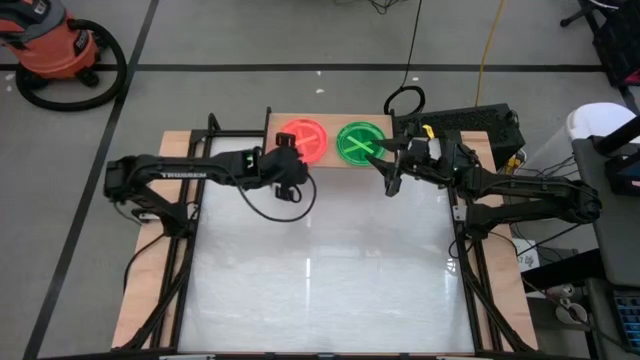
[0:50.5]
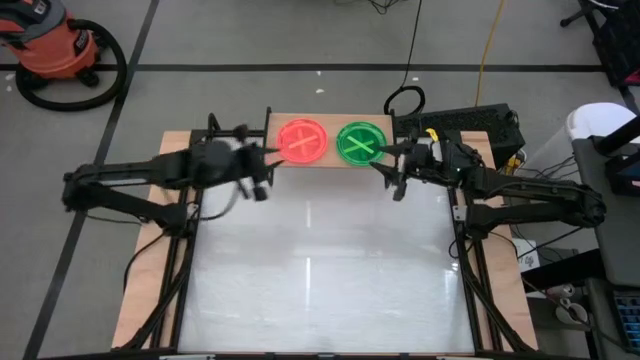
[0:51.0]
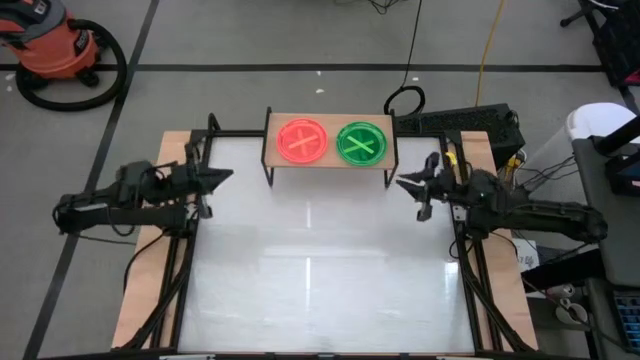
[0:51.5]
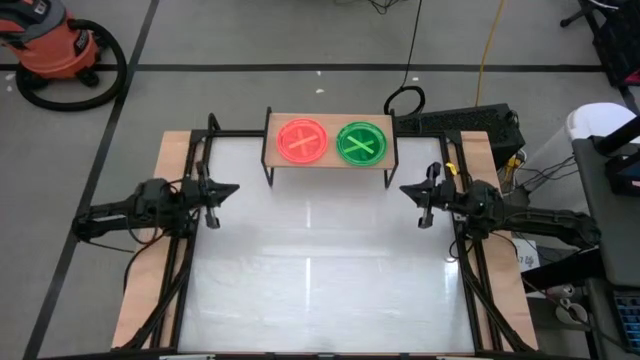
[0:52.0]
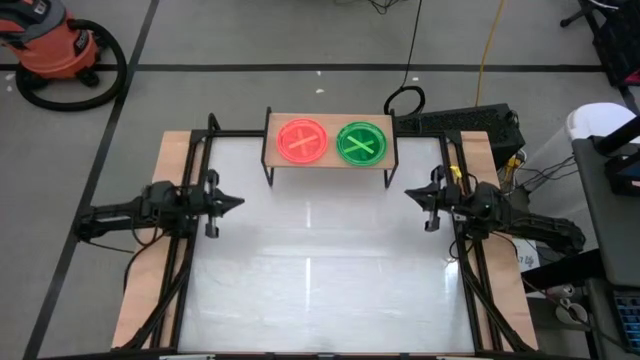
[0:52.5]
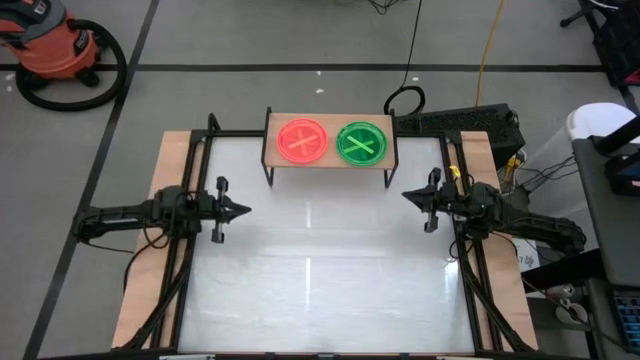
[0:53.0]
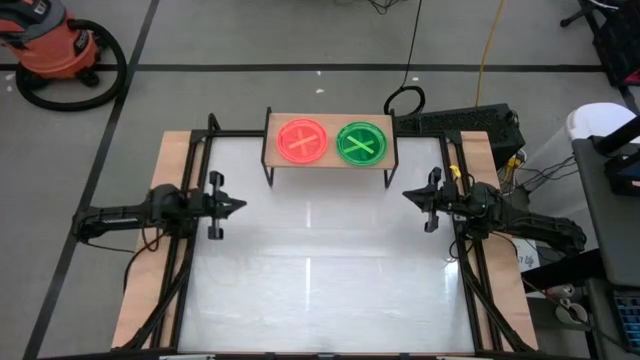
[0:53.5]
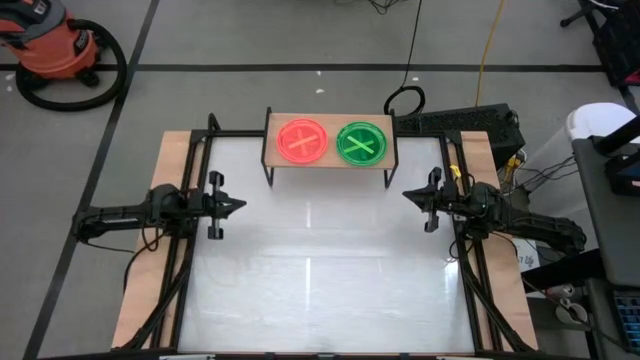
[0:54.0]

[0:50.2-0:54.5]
Task: Place and stack plates onto a shelf
Return to Home Position

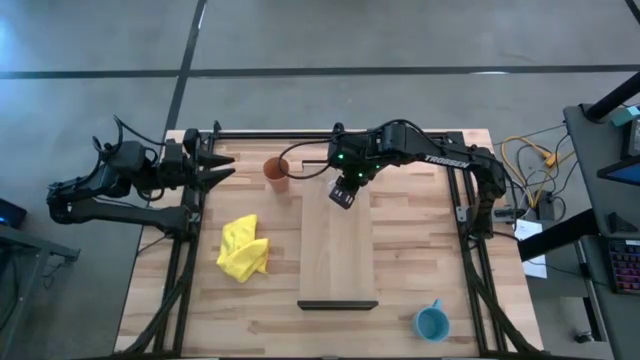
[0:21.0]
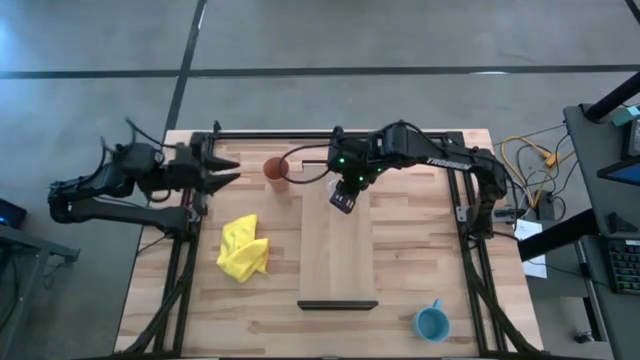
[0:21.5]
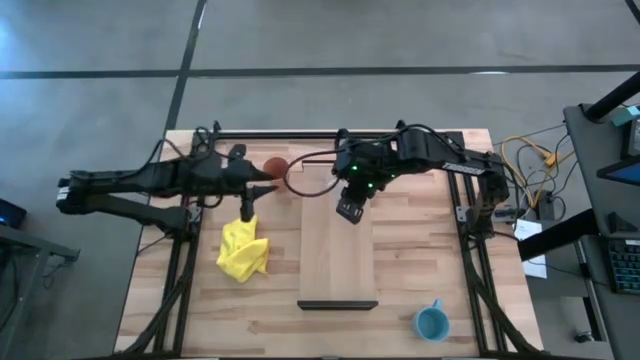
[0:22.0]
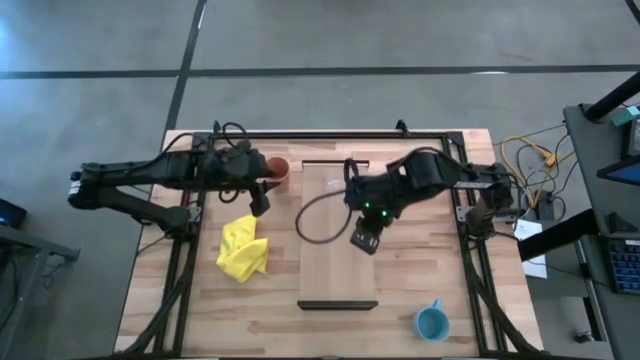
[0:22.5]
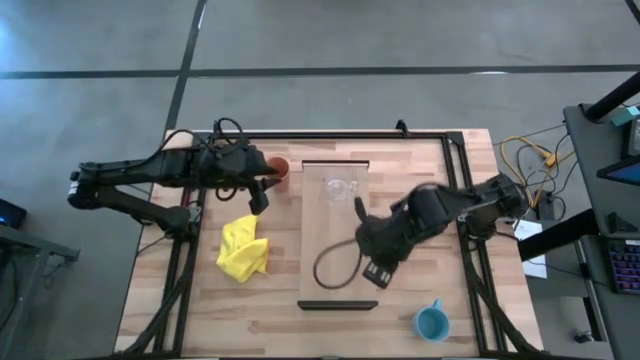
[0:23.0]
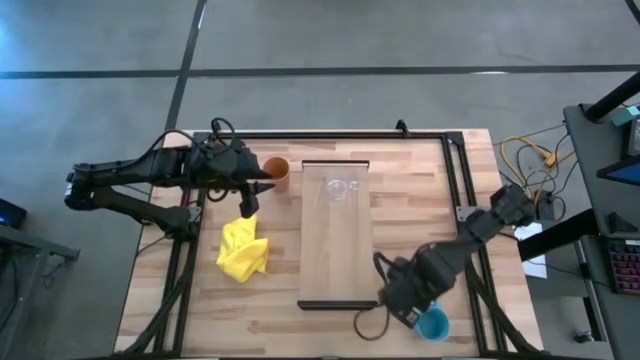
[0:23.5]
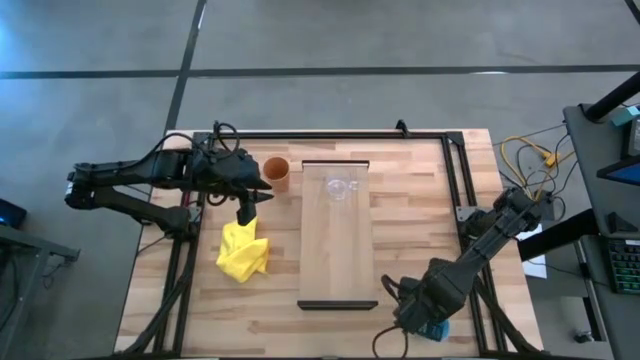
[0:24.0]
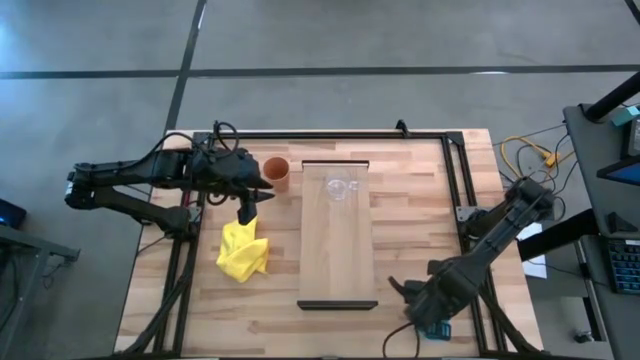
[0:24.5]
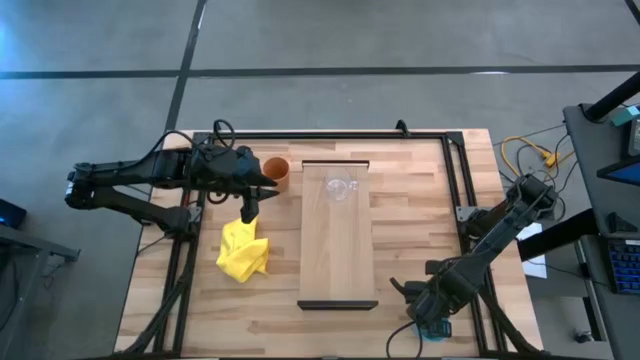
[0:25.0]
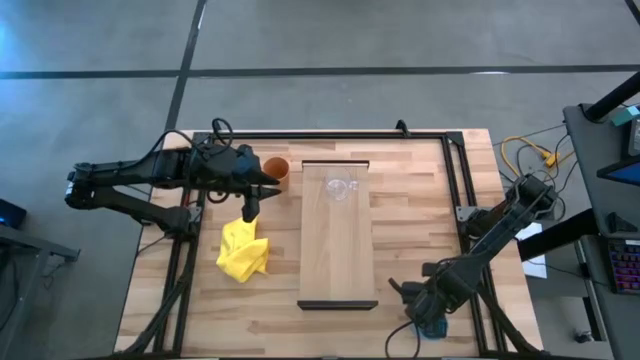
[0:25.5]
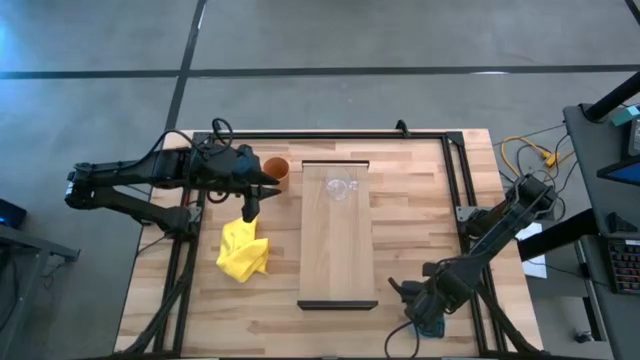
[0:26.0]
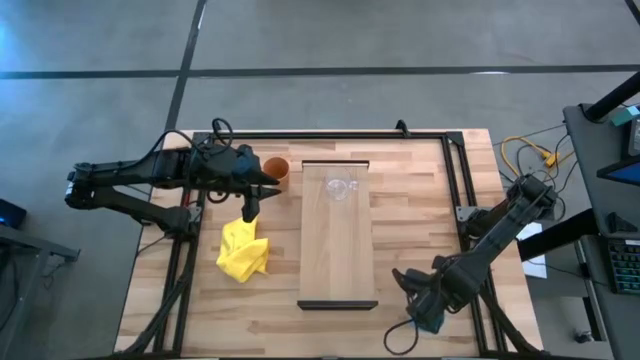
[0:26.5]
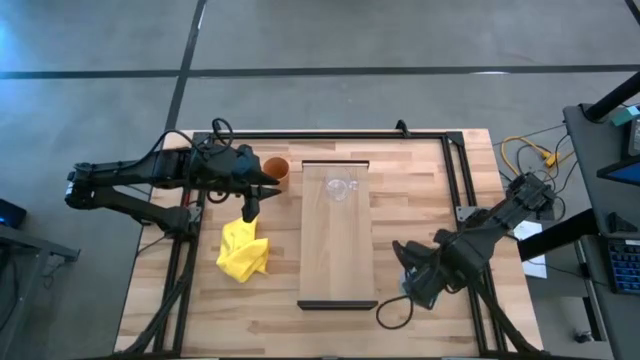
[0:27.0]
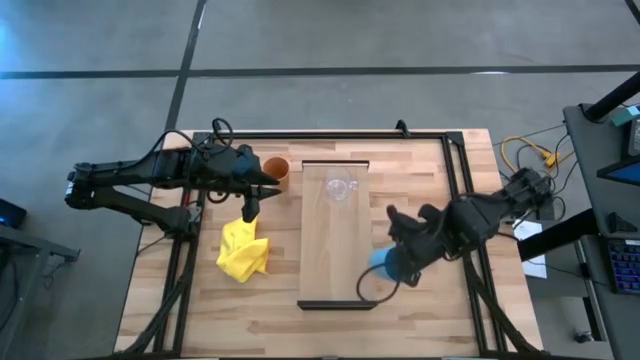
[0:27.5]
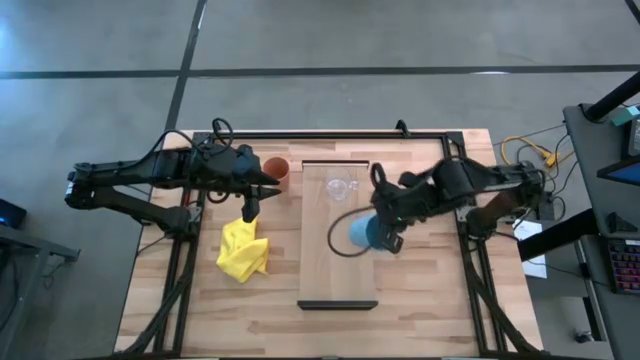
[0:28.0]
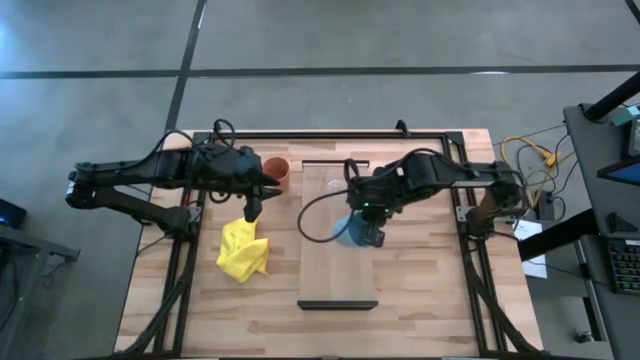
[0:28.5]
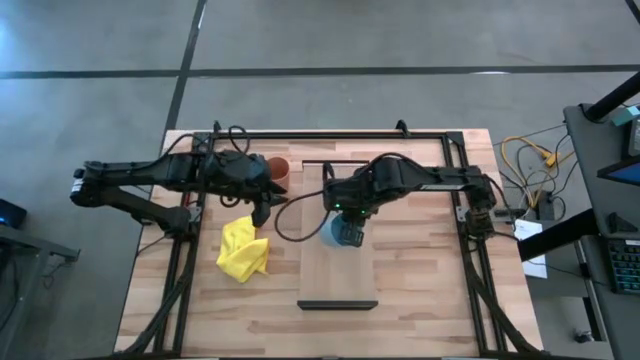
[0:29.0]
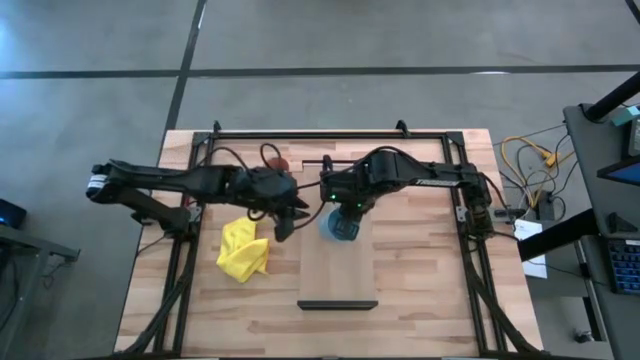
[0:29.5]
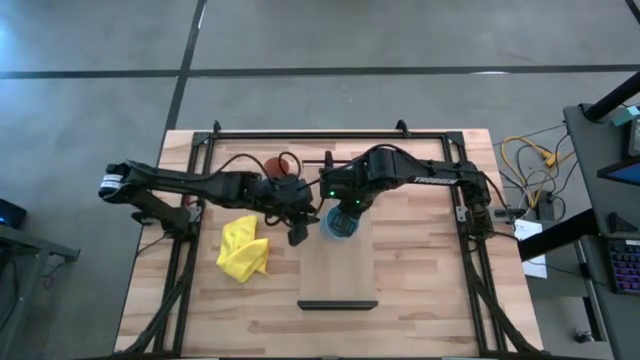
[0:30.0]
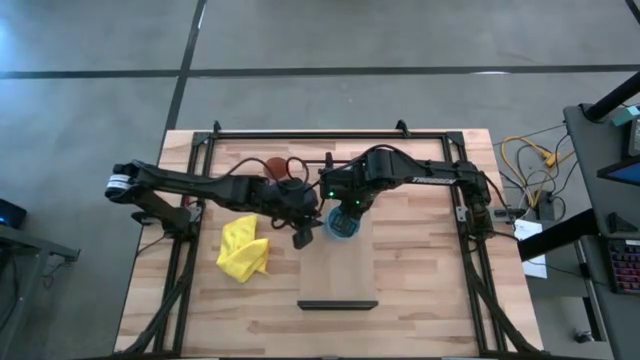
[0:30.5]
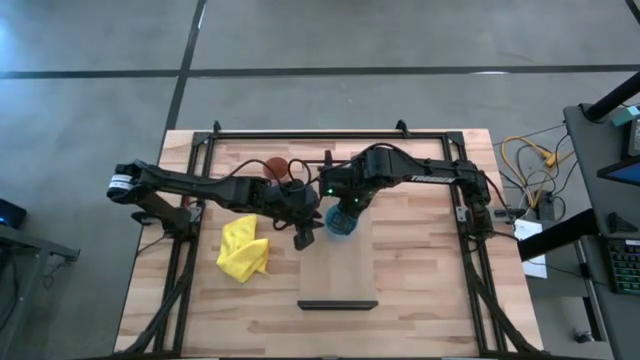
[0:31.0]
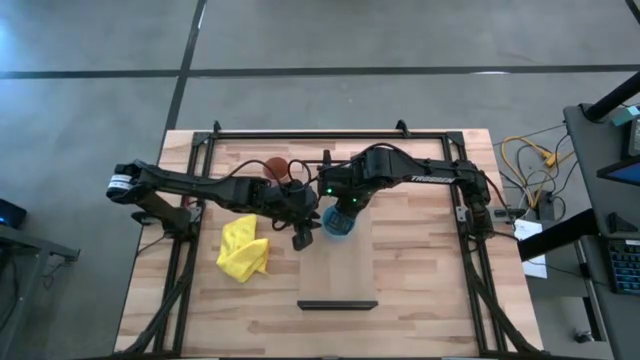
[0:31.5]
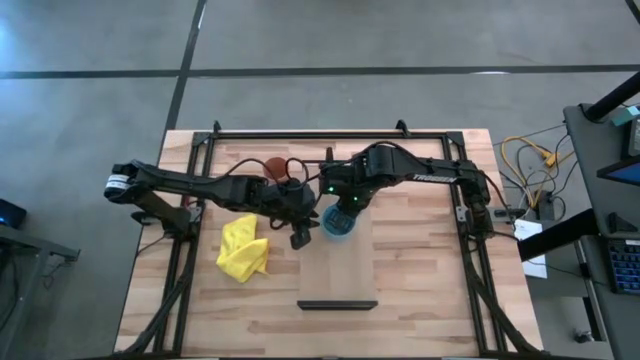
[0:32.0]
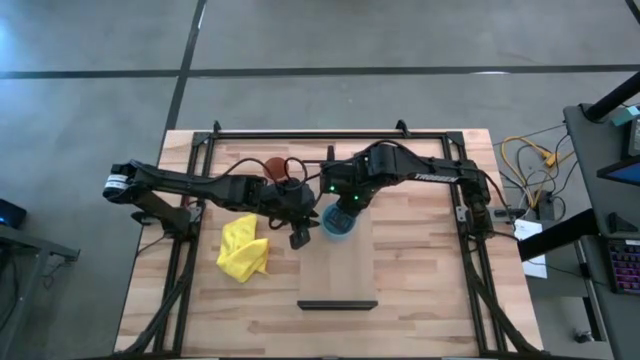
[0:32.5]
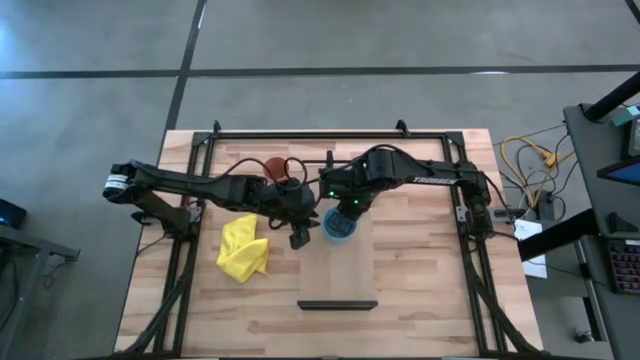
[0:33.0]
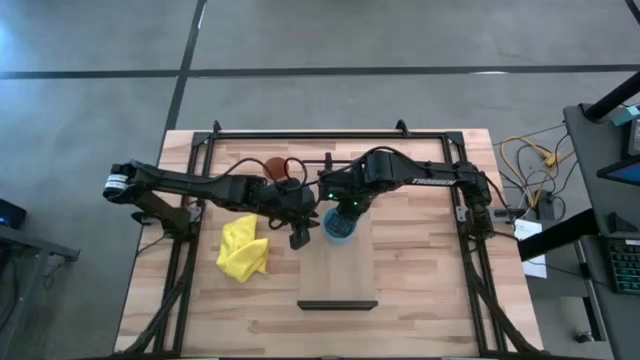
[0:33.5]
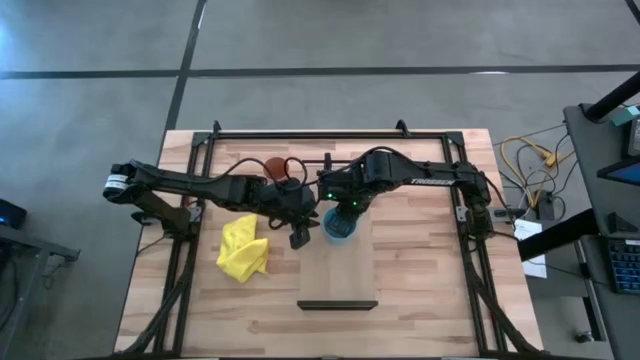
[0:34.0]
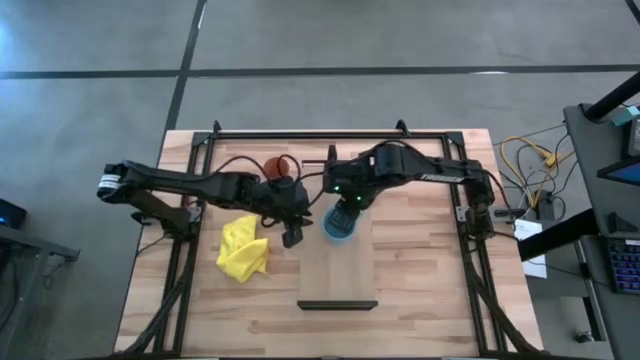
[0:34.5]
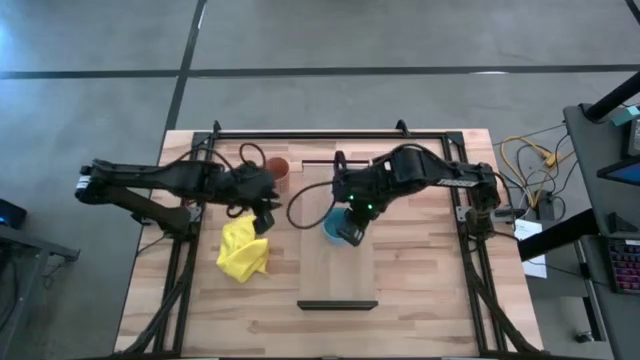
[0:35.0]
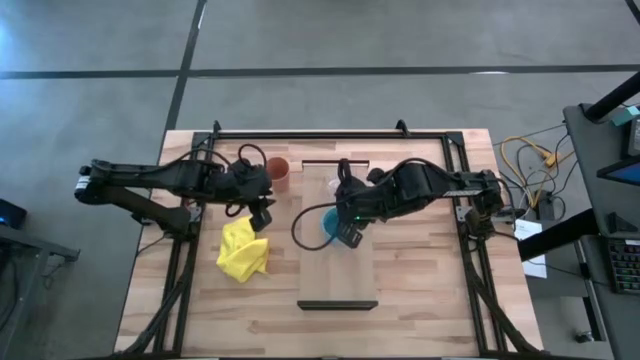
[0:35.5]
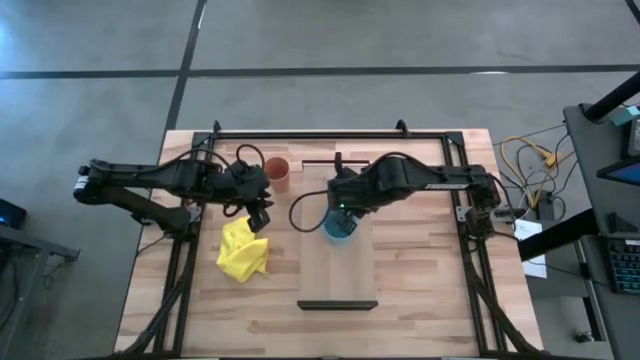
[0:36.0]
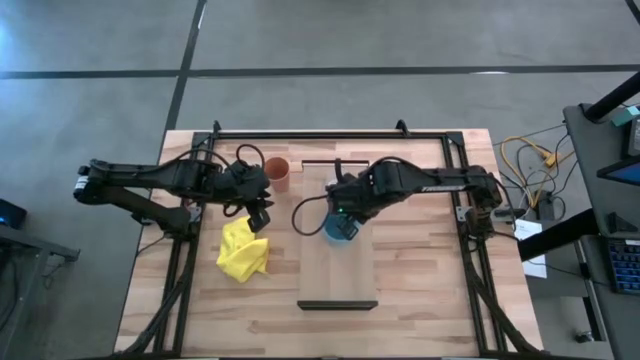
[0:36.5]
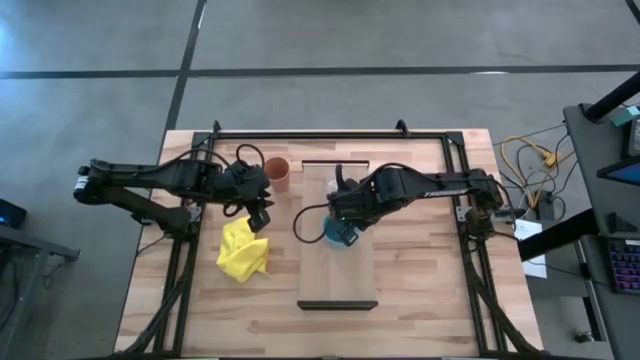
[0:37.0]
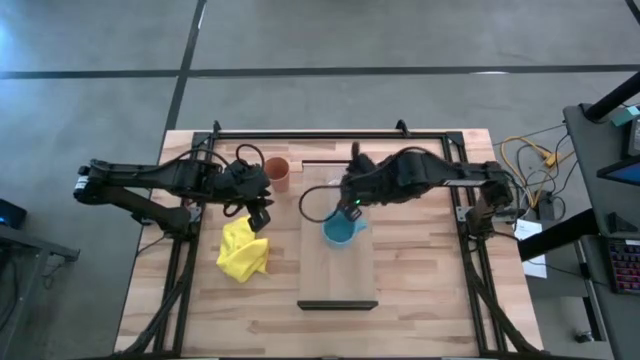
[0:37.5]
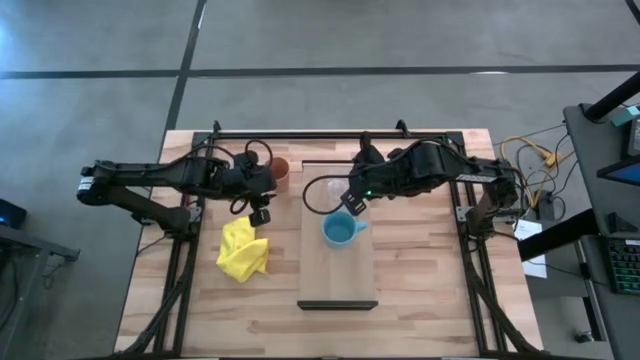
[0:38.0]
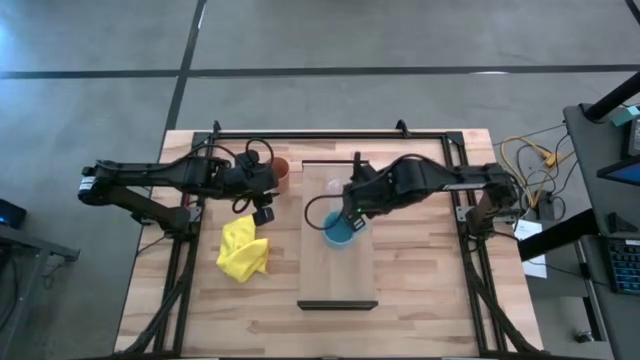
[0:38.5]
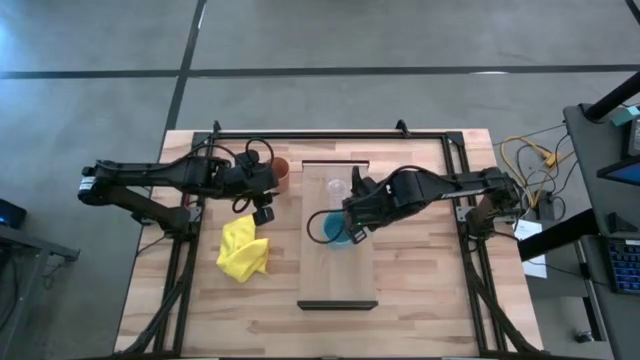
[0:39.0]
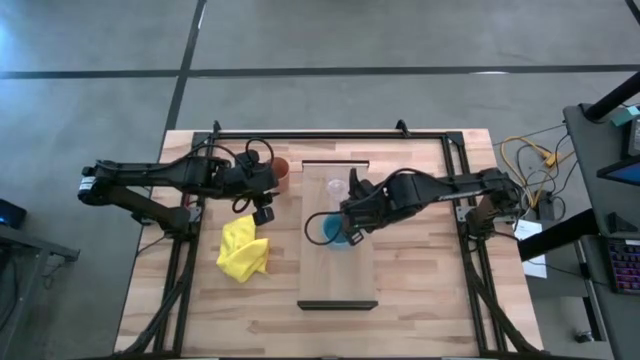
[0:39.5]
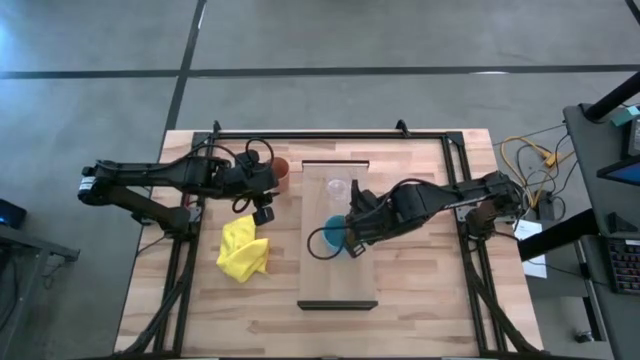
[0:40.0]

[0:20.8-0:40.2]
Task: Stack small to large cups/mugs on shelf
Put the blue mug on the shelf
